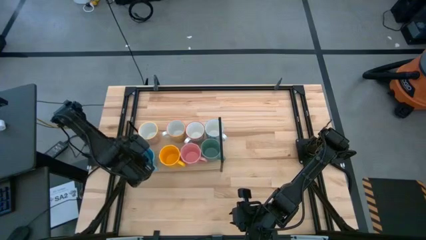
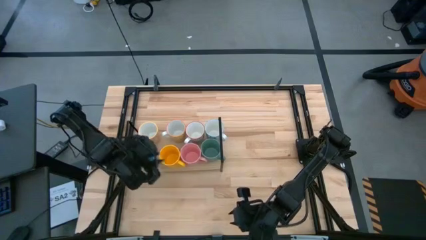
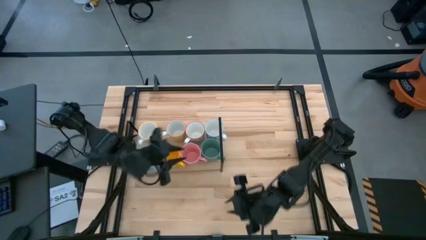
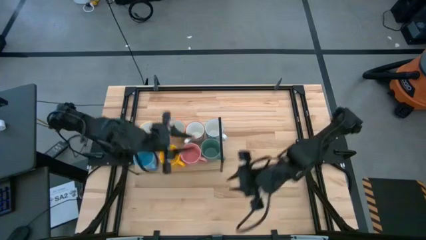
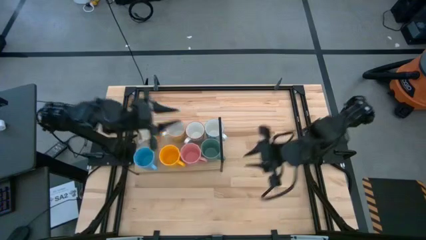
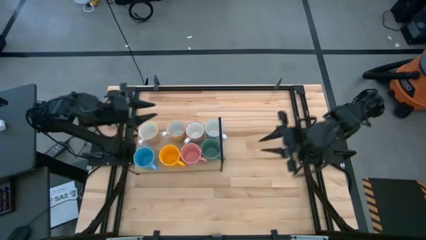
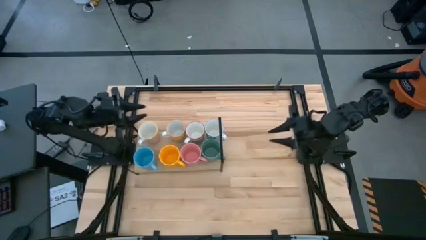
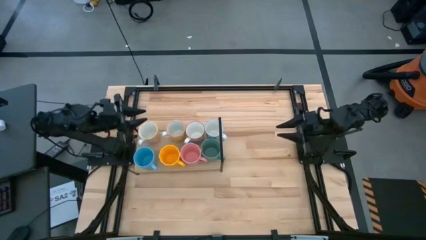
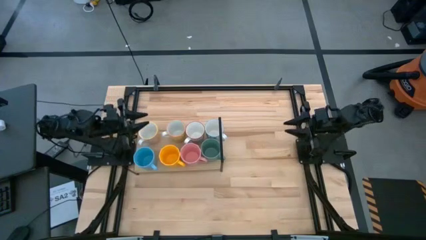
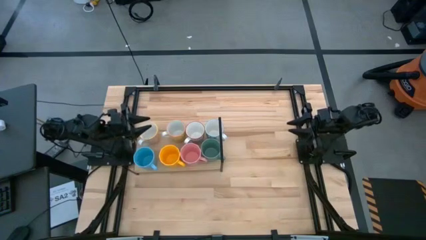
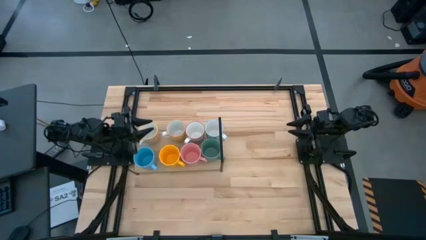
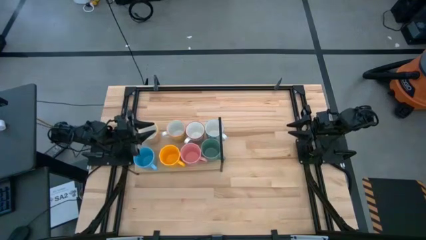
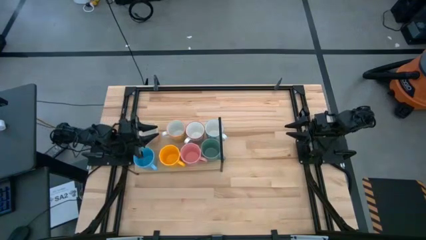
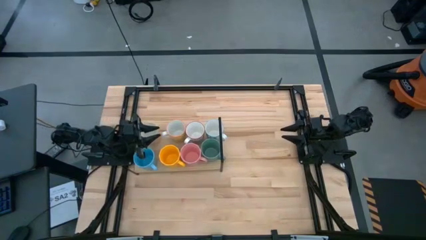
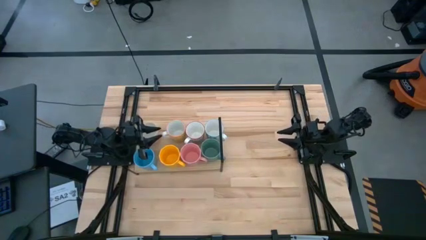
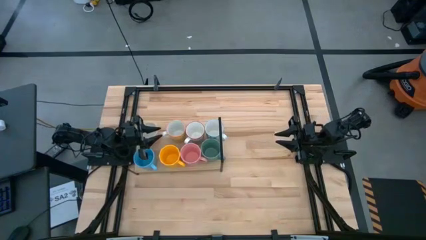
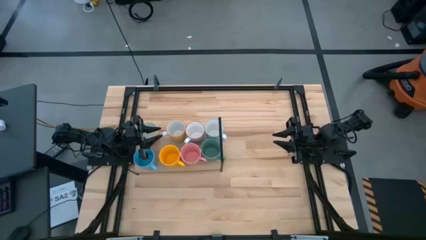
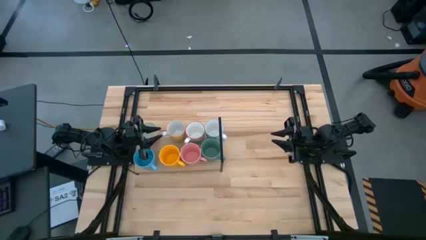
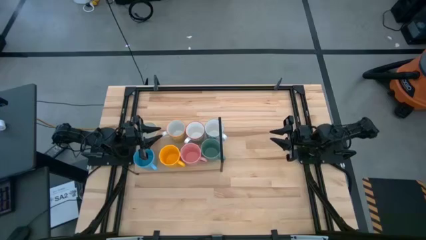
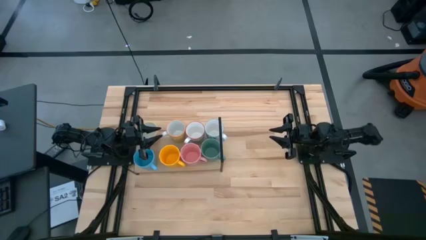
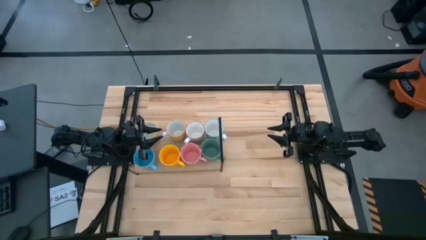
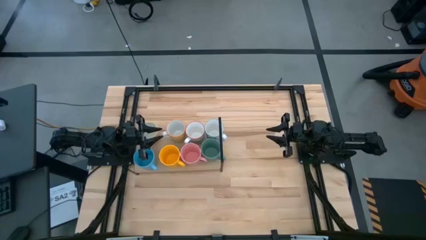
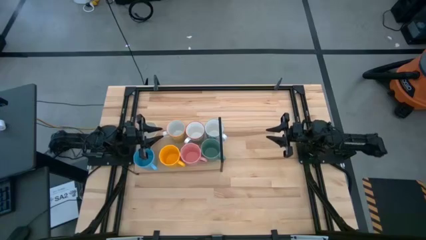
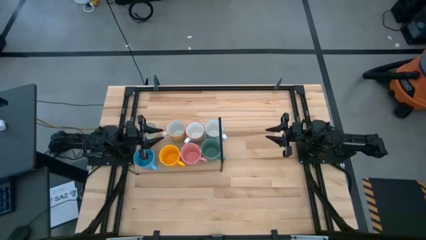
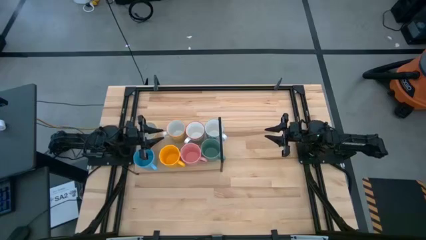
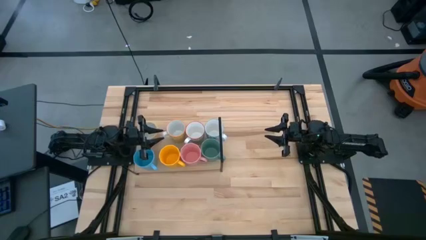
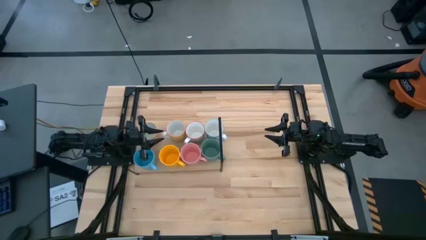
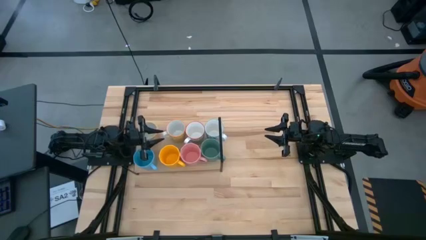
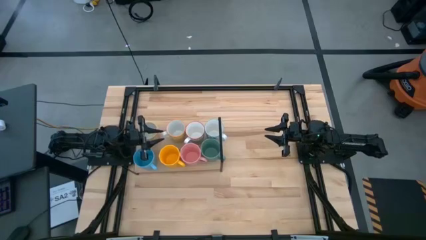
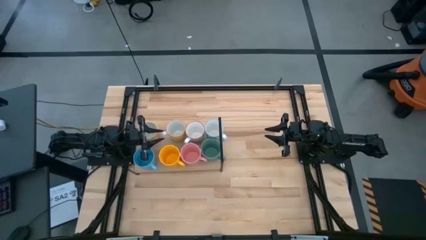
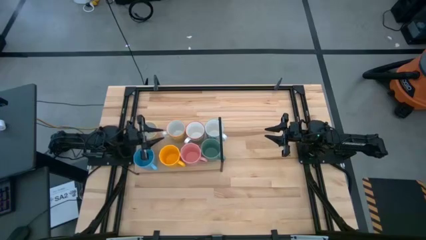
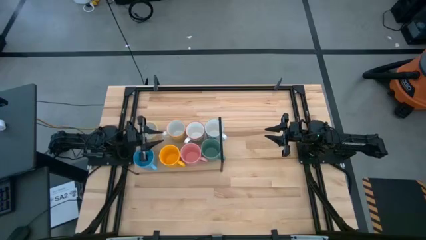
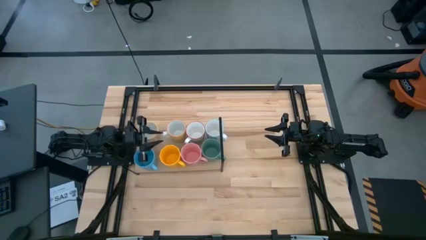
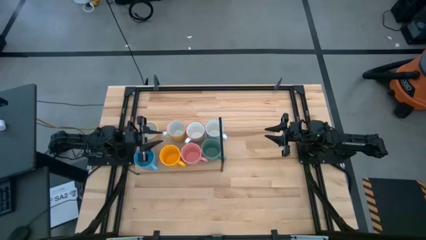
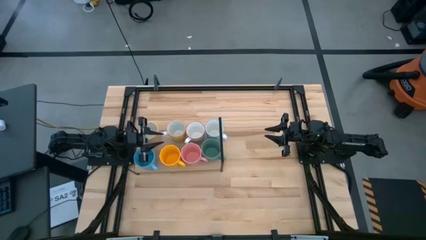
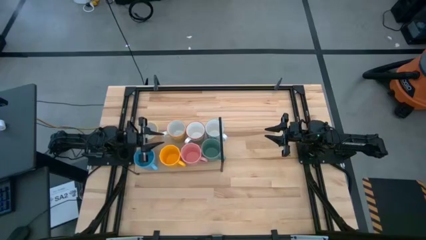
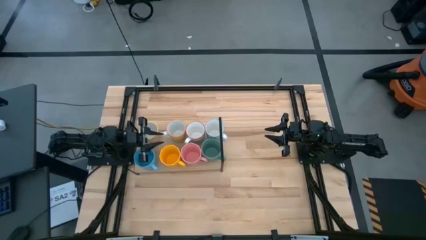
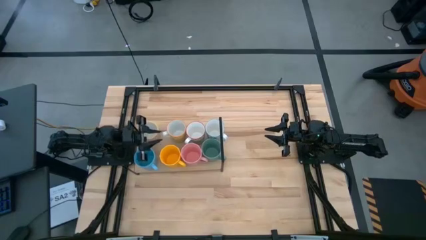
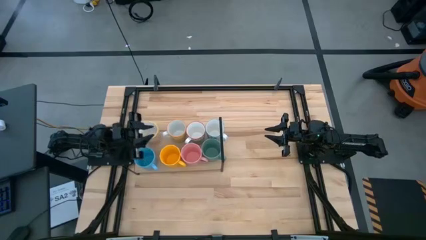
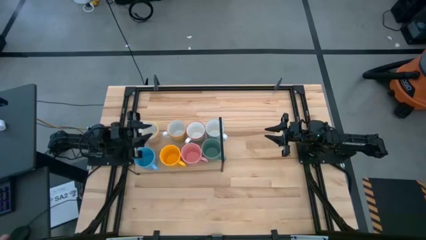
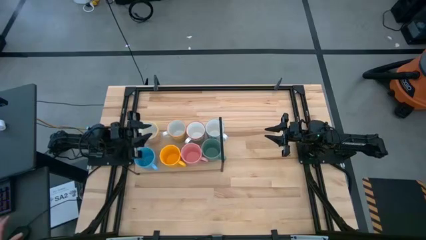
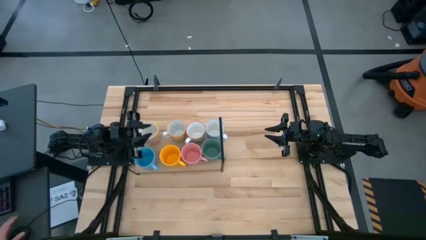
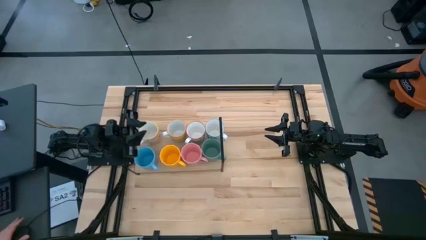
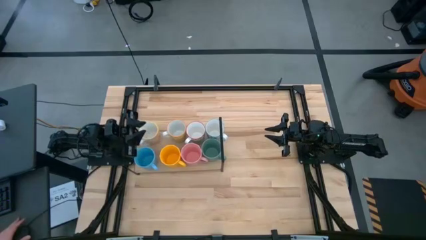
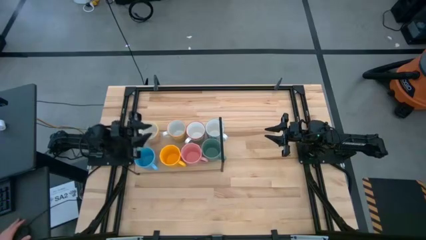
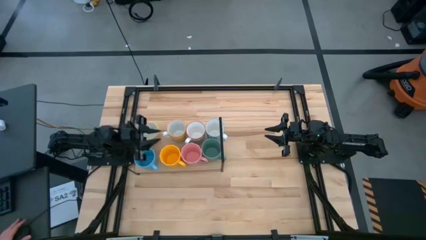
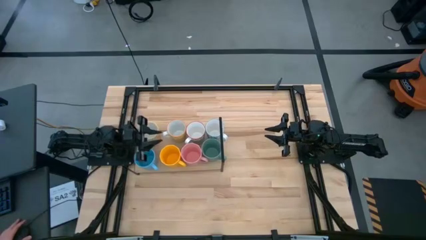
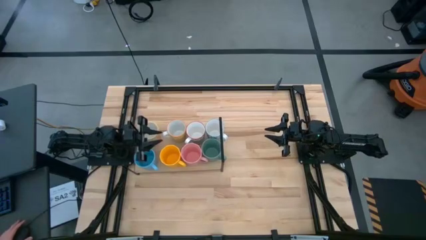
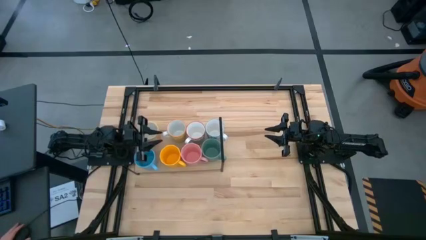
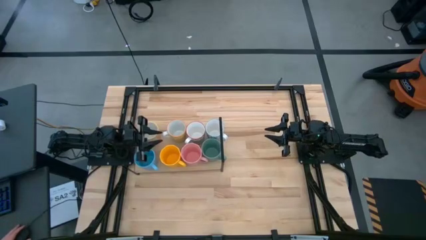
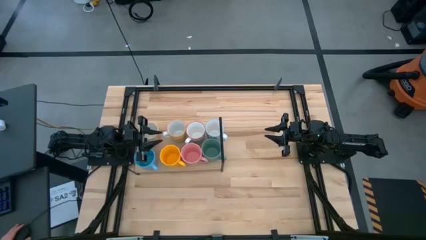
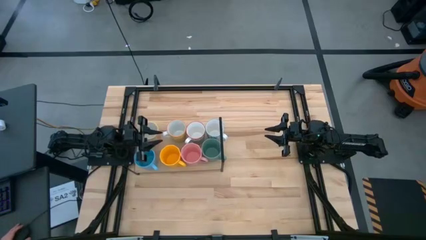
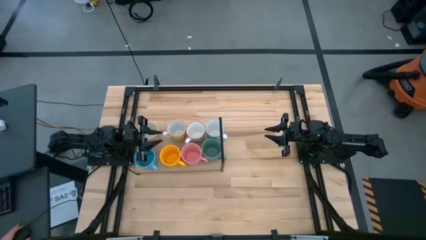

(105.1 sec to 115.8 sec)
Task: Place coffee mugs
Return to Home Position

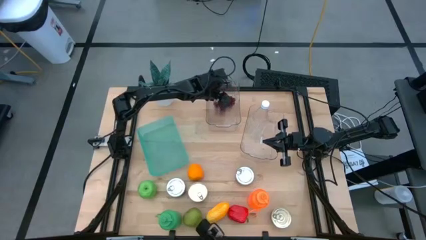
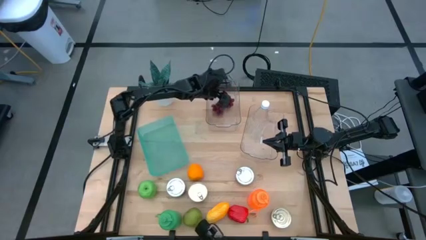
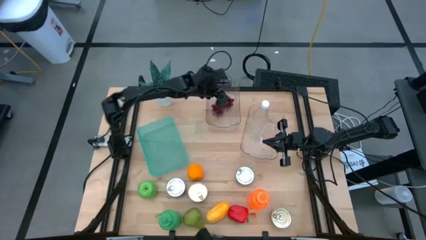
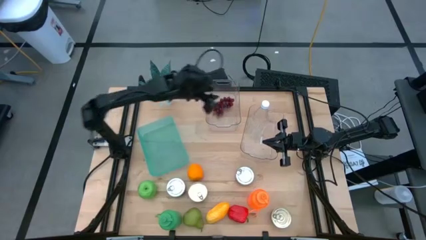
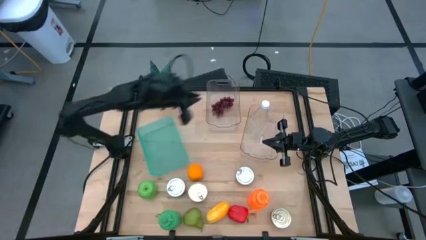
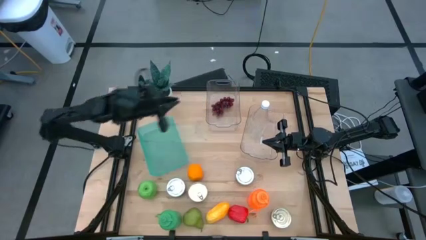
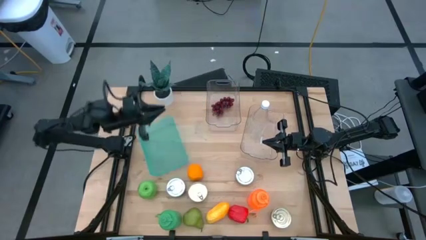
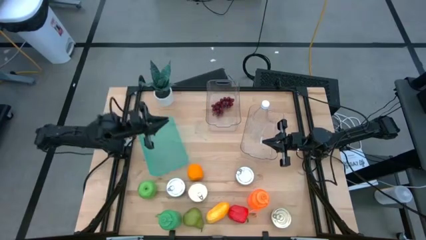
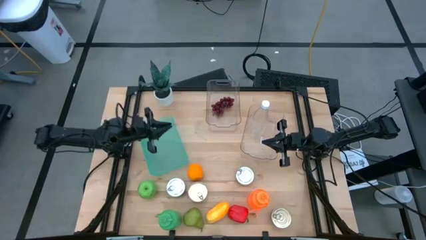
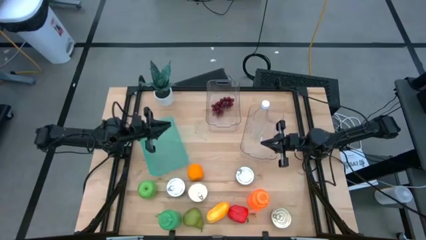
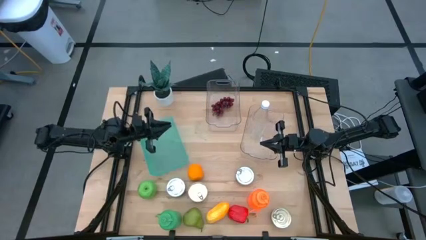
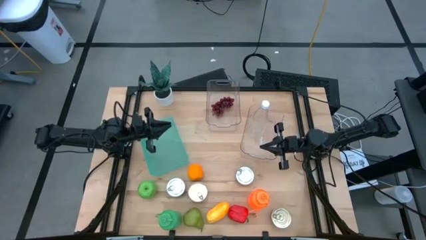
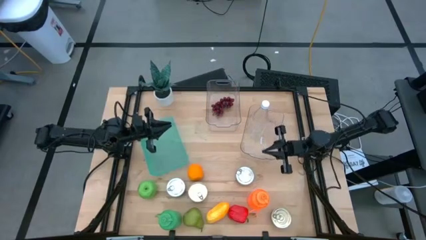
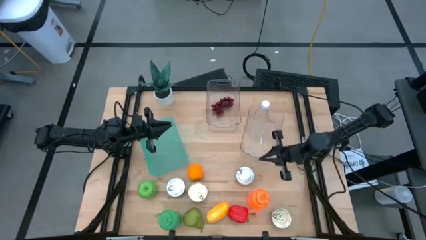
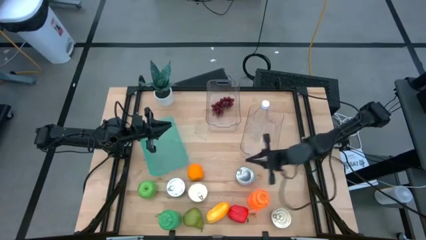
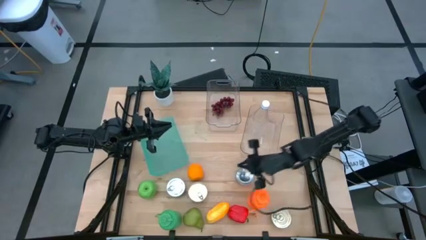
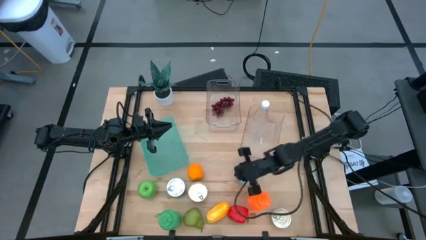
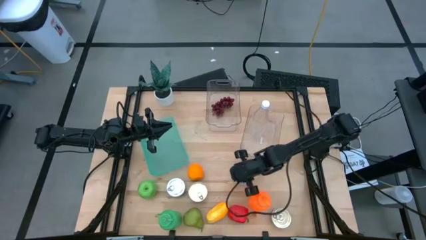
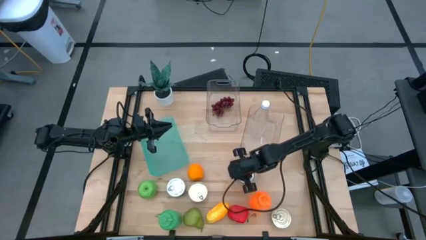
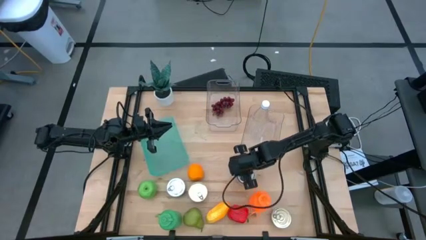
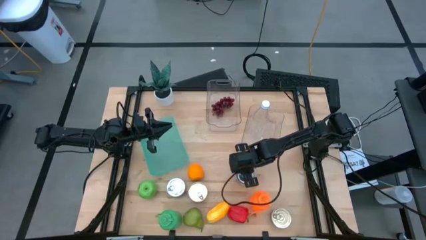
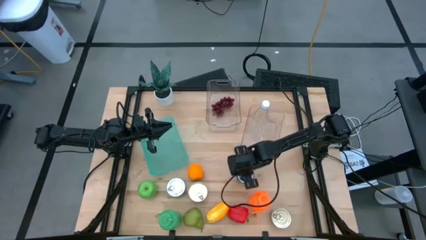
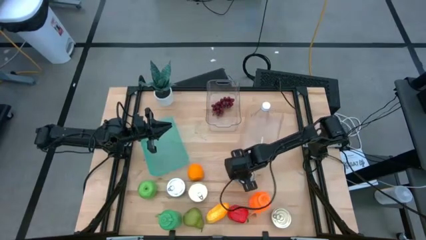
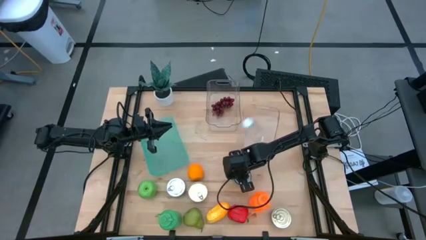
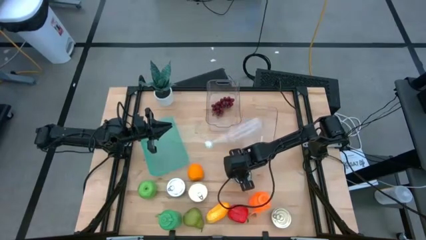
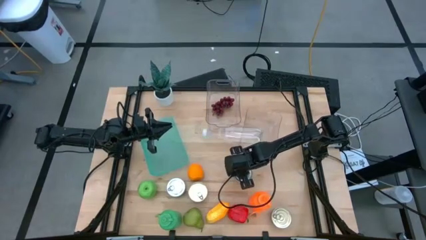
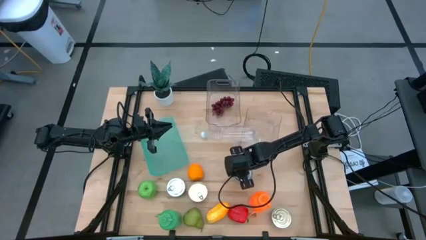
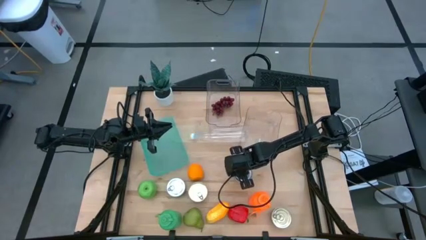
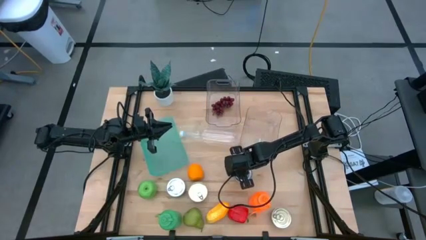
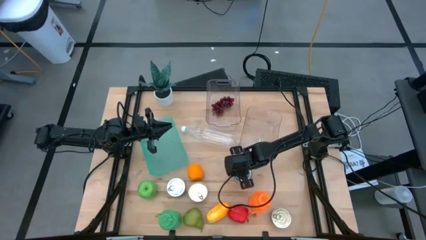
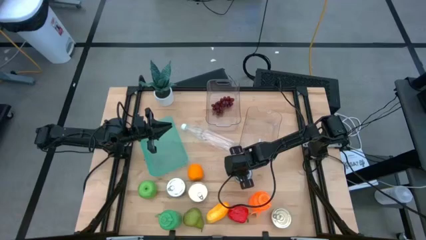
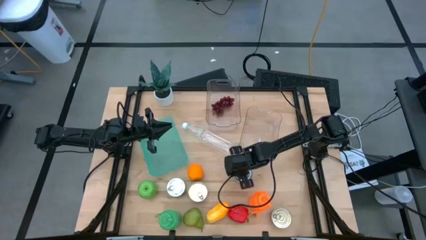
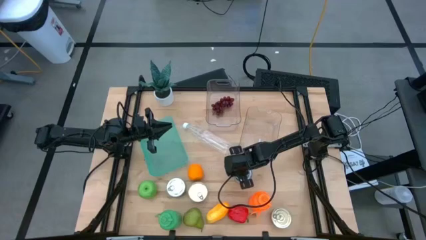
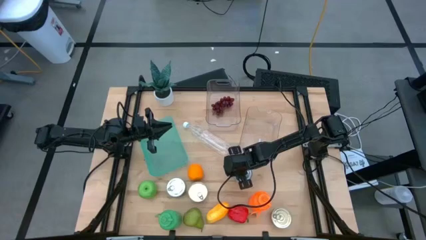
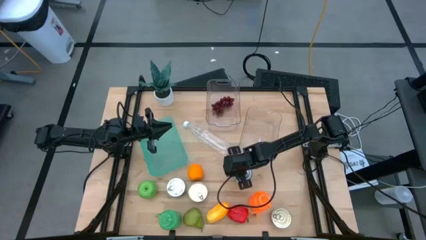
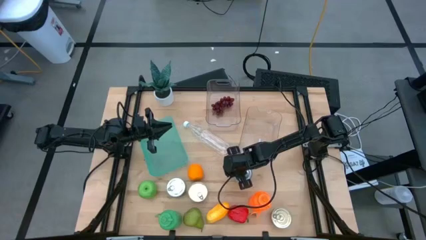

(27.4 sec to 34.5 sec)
Task: Pick & Place Food Item
Adjust the blue and pink tuna can on the table
